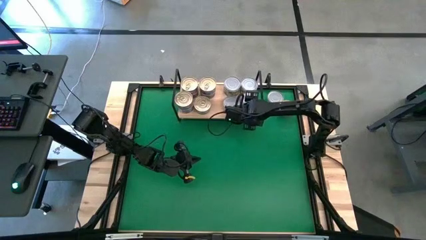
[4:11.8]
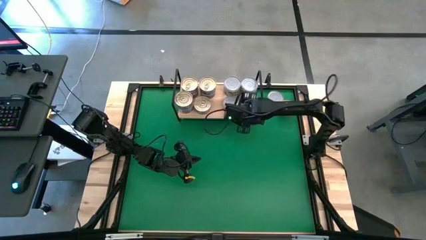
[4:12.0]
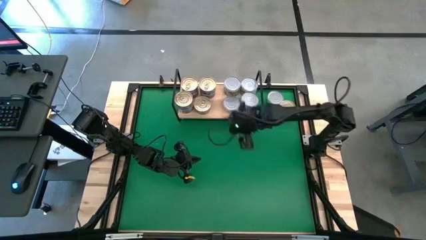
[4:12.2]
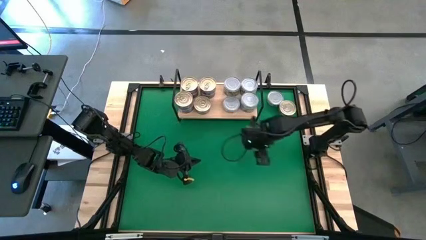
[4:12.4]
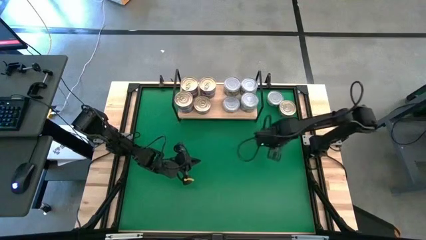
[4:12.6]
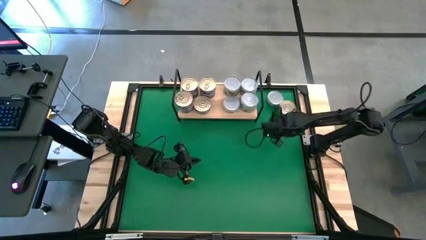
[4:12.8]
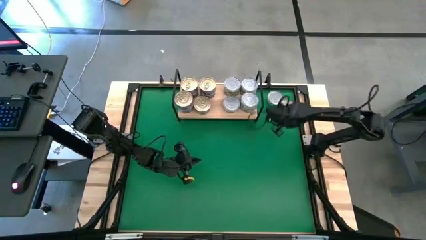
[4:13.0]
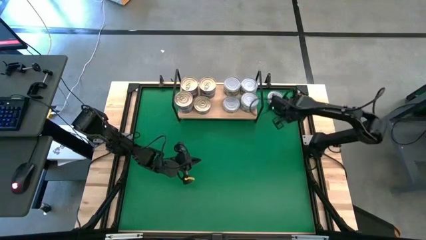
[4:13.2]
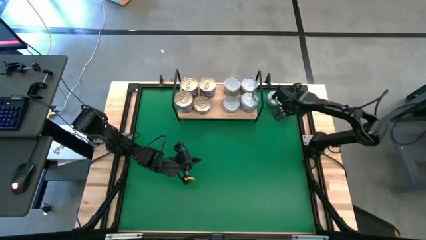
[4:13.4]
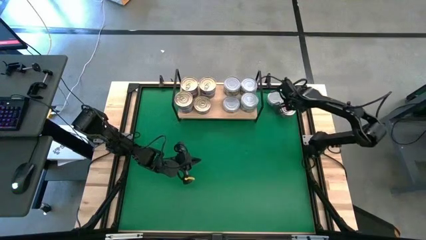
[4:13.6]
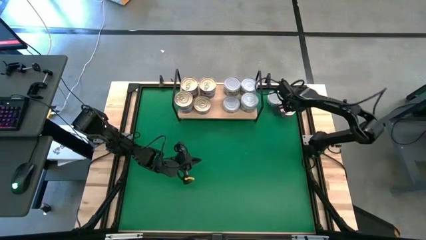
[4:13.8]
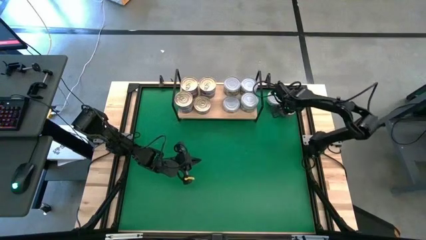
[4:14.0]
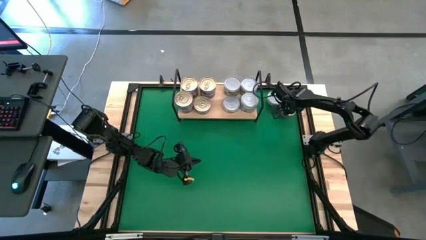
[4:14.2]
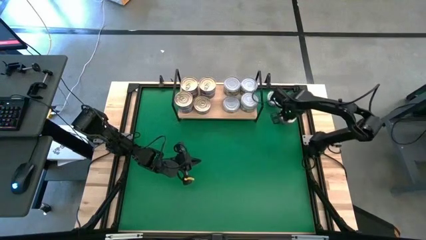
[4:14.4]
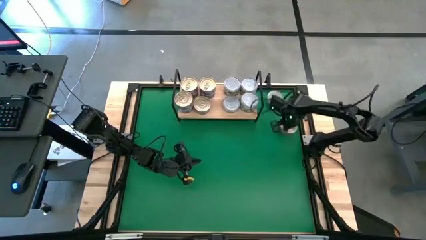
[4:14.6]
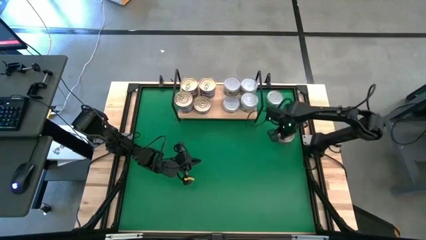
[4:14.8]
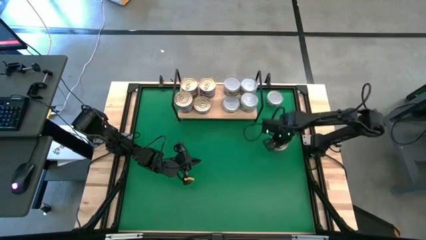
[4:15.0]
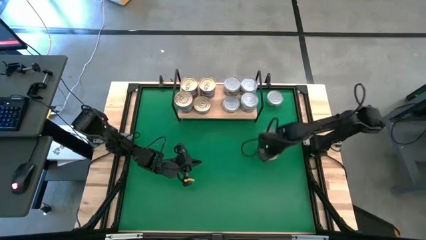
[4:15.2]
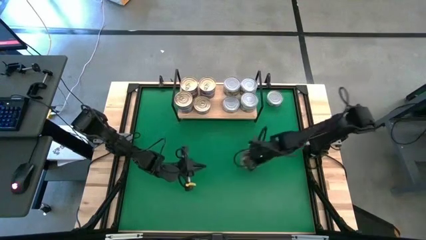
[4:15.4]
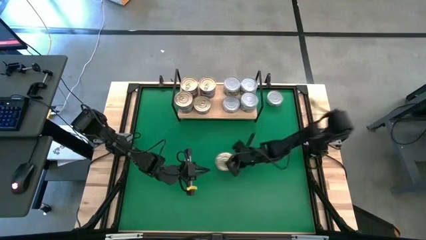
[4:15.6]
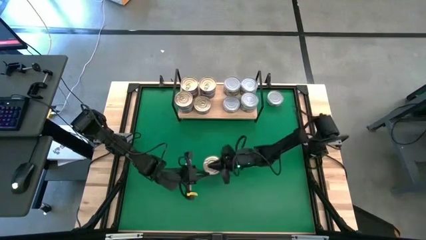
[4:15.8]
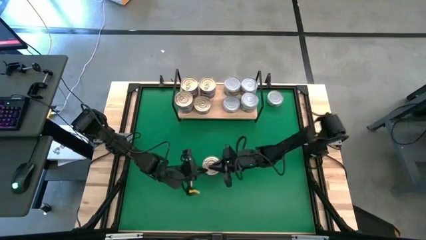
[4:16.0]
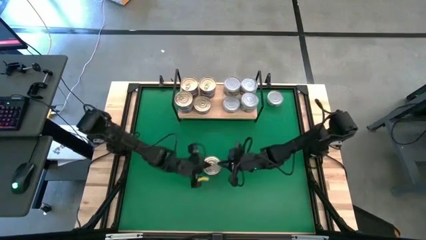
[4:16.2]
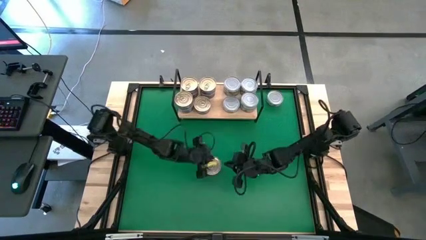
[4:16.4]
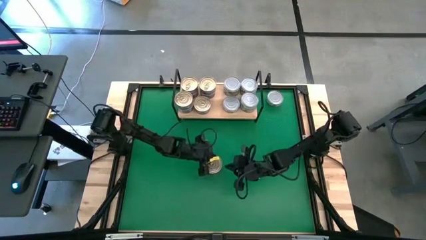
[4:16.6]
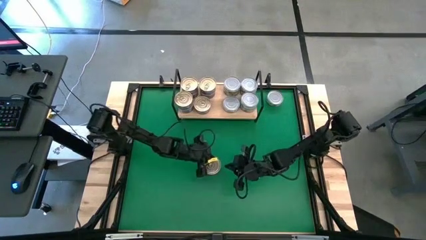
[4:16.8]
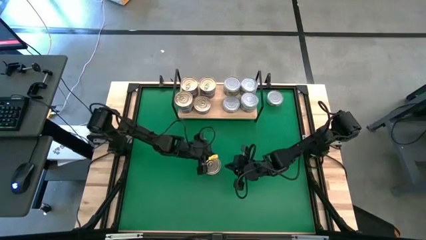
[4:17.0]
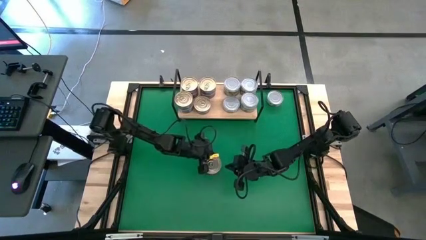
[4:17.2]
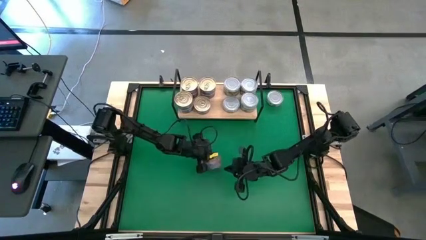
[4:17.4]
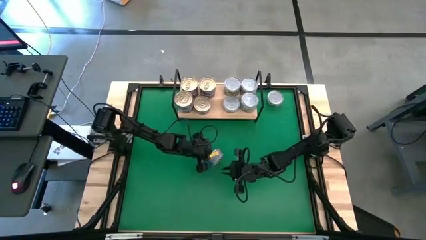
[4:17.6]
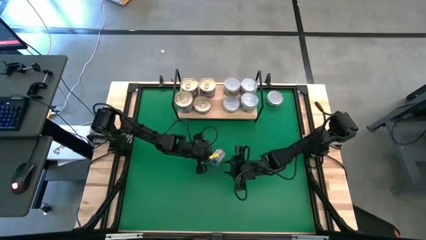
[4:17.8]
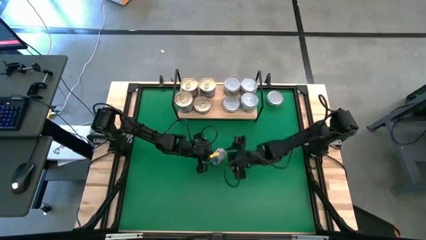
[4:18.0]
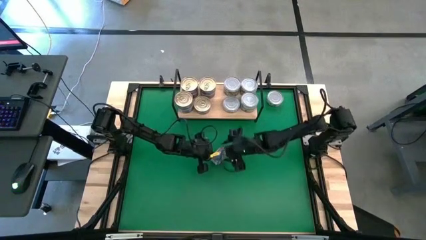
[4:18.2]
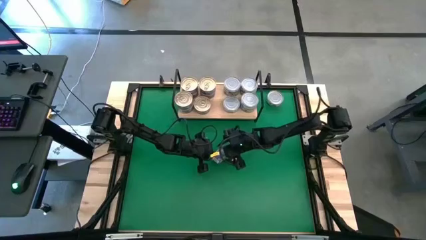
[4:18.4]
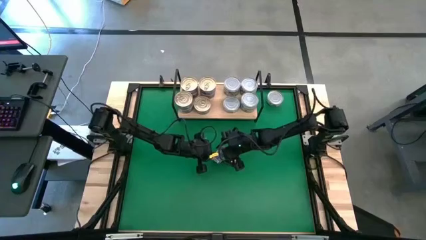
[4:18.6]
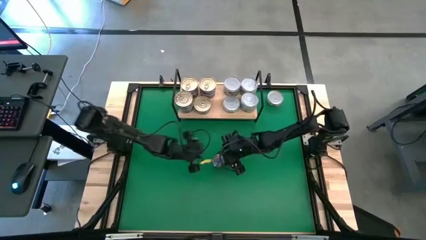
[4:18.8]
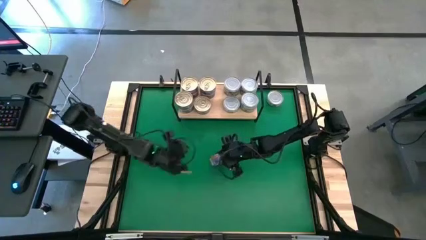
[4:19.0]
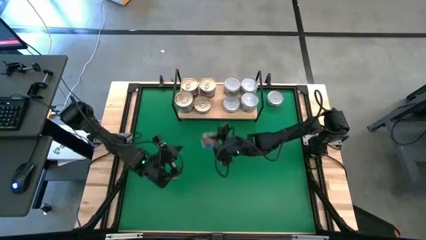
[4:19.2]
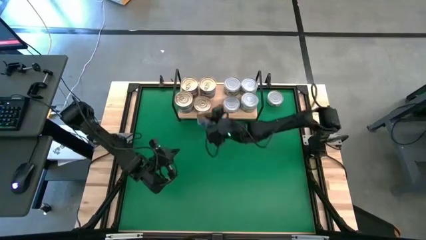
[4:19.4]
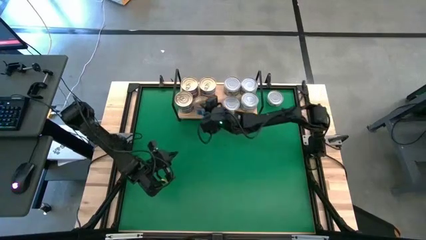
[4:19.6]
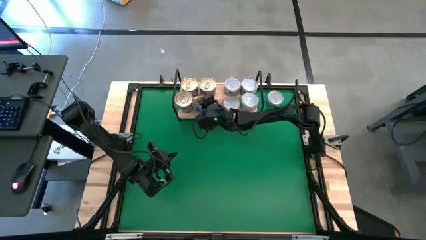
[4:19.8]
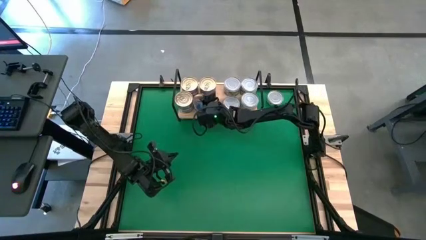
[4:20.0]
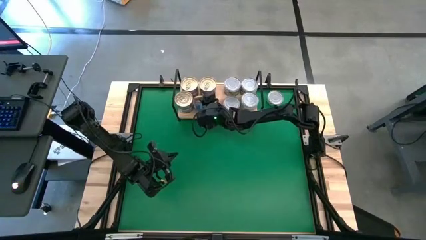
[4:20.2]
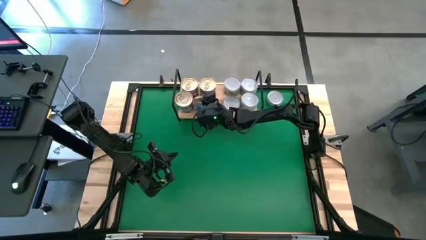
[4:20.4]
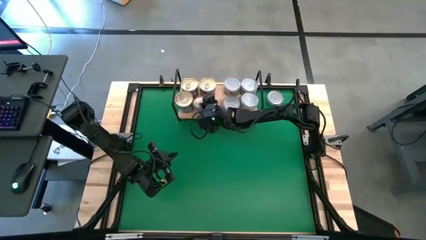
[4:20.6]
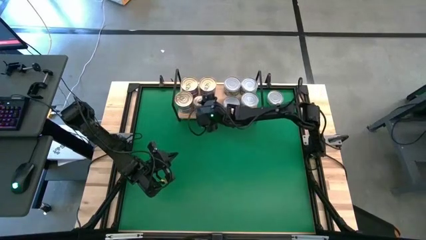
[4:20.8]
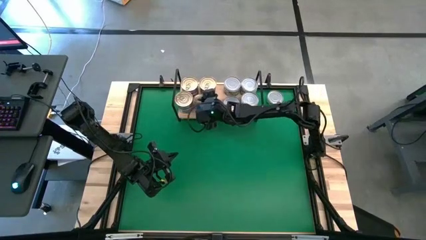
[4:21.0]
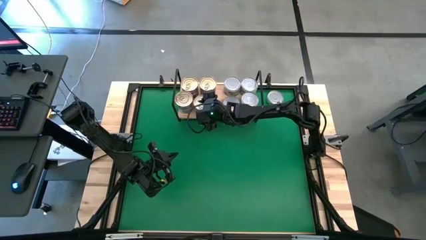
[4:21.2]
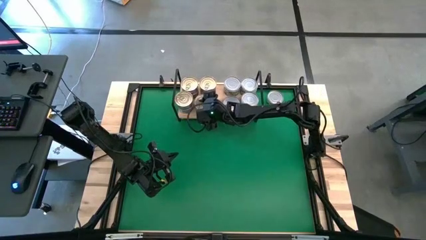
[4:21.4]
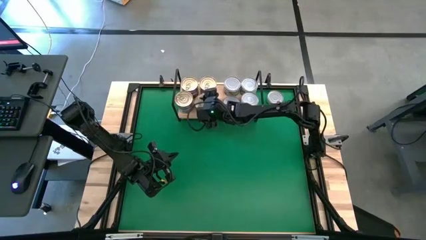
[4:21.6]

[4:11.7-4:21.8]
Task: Stack canned seafood by type on shelf
Stack the blue pink tuna can on top of the other blue pink tuna can on the shelf

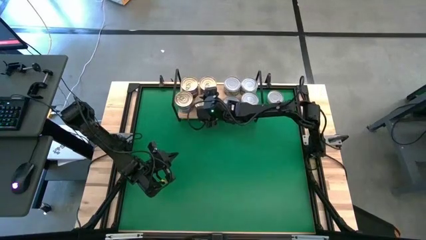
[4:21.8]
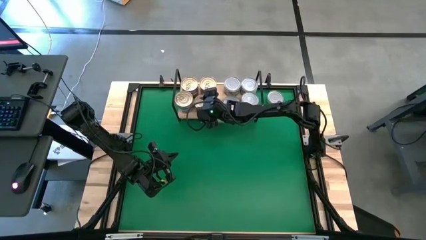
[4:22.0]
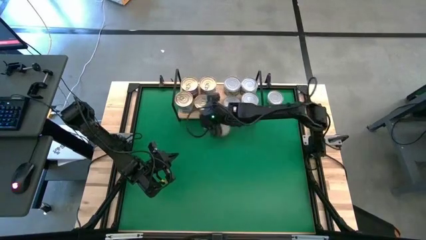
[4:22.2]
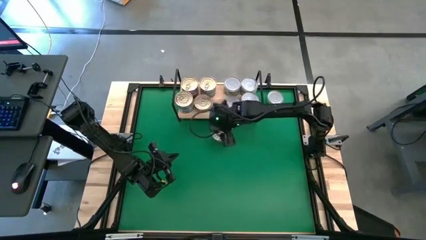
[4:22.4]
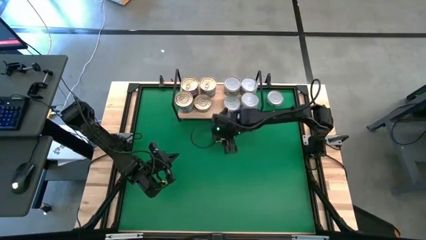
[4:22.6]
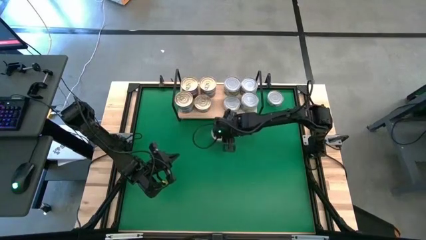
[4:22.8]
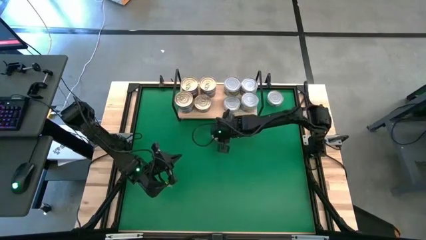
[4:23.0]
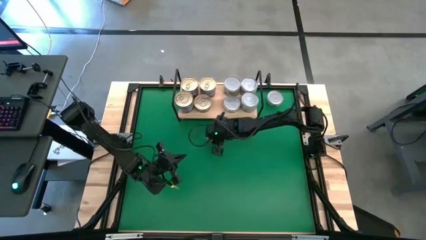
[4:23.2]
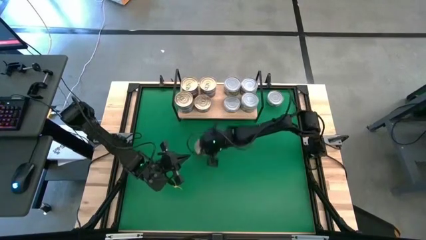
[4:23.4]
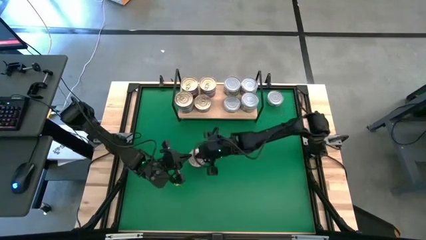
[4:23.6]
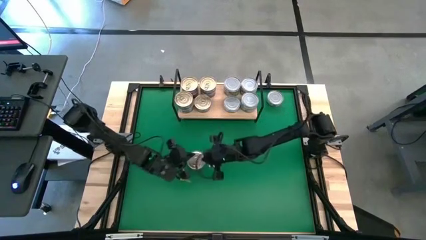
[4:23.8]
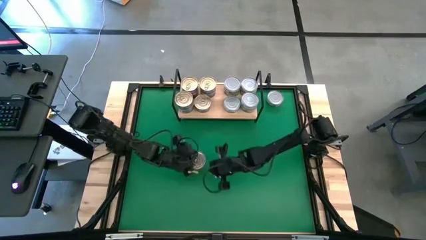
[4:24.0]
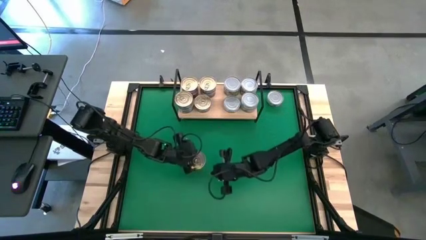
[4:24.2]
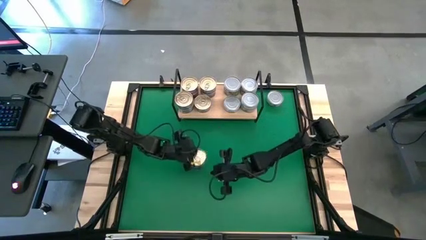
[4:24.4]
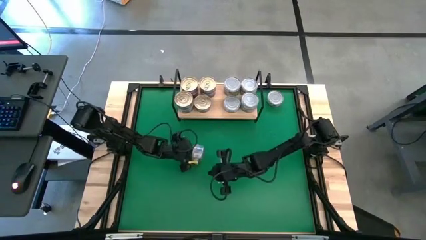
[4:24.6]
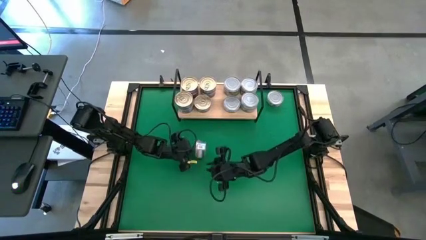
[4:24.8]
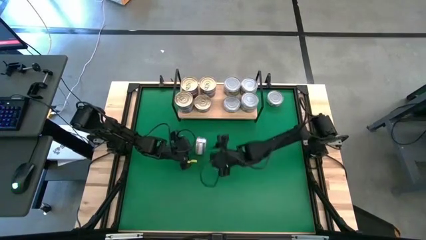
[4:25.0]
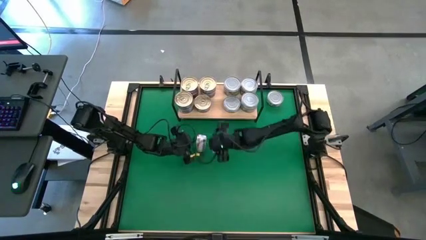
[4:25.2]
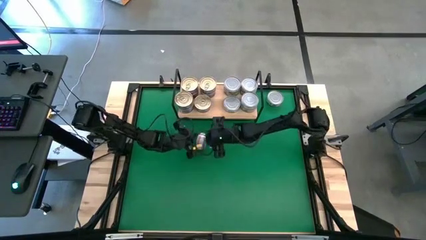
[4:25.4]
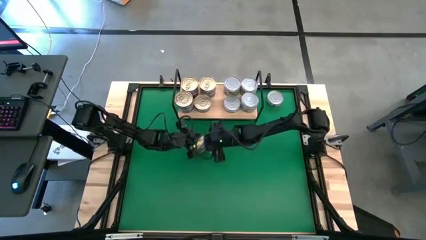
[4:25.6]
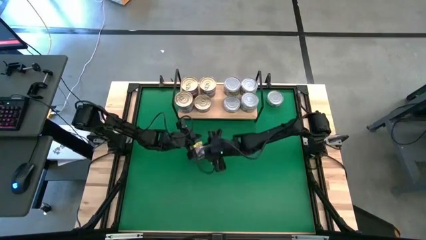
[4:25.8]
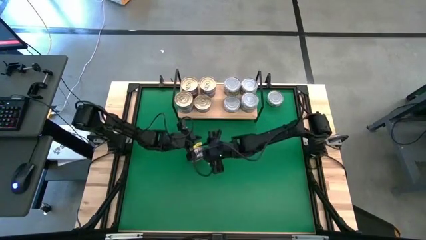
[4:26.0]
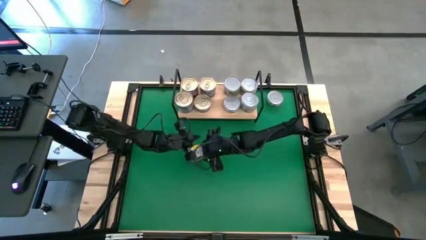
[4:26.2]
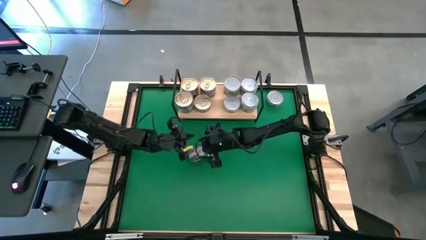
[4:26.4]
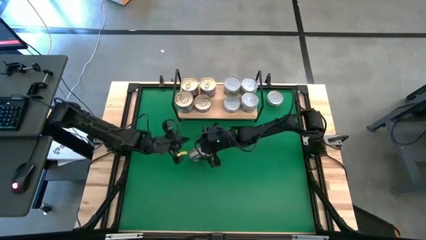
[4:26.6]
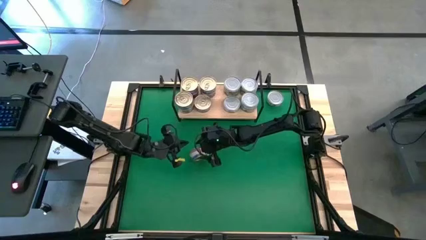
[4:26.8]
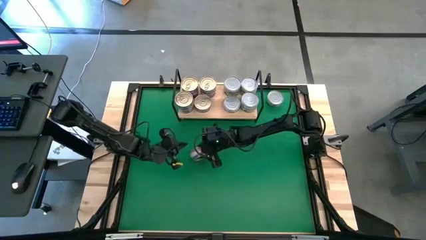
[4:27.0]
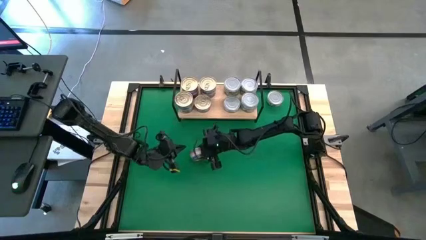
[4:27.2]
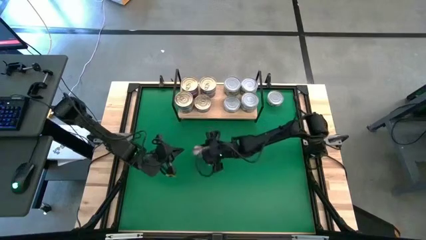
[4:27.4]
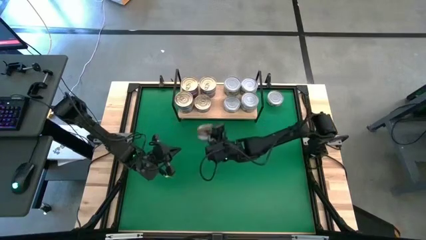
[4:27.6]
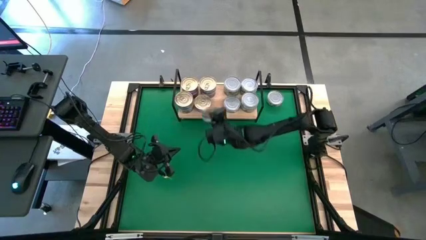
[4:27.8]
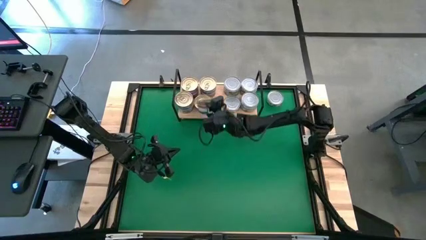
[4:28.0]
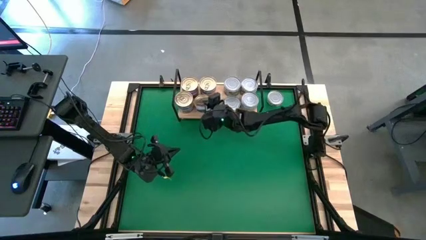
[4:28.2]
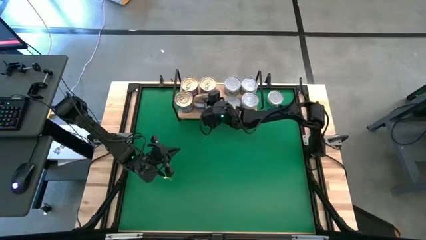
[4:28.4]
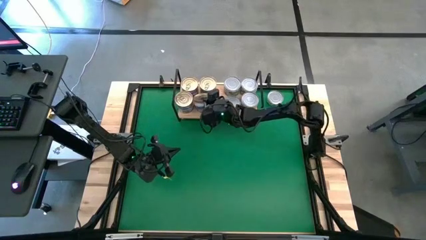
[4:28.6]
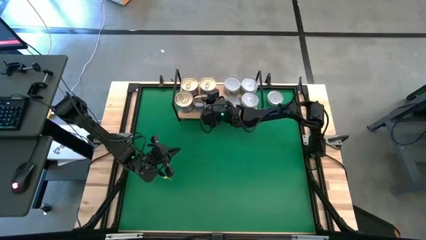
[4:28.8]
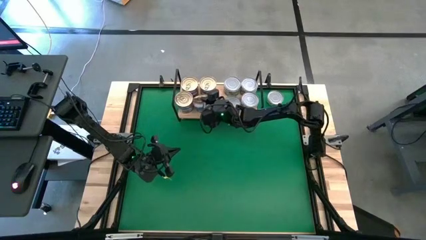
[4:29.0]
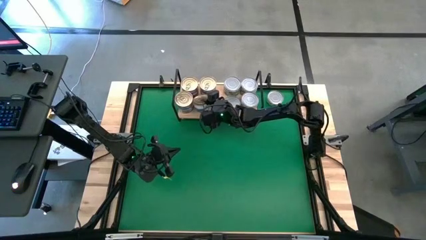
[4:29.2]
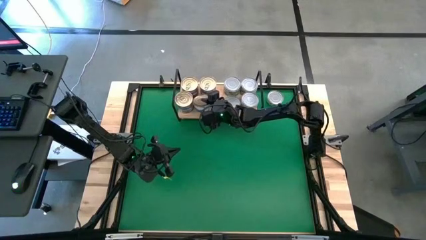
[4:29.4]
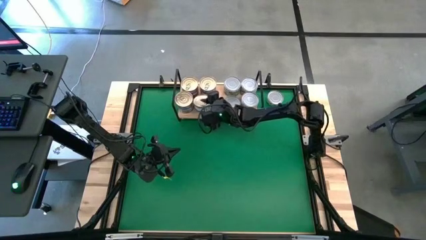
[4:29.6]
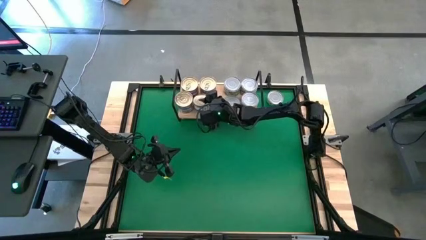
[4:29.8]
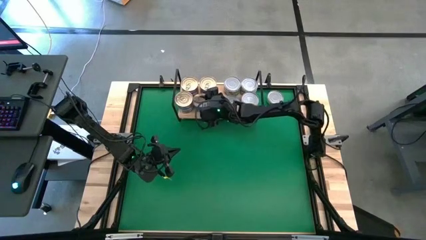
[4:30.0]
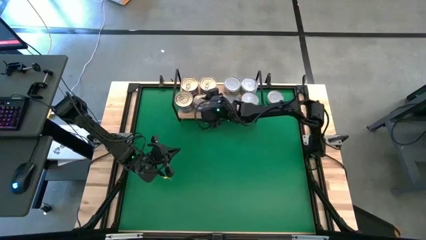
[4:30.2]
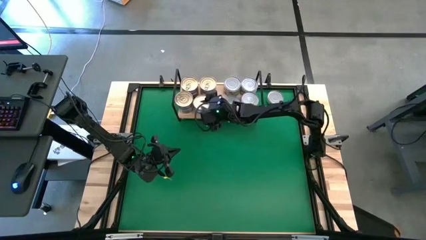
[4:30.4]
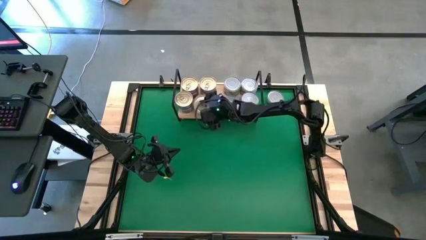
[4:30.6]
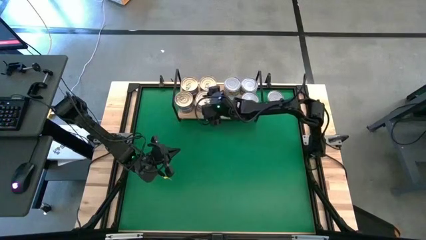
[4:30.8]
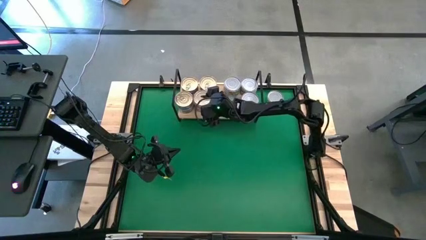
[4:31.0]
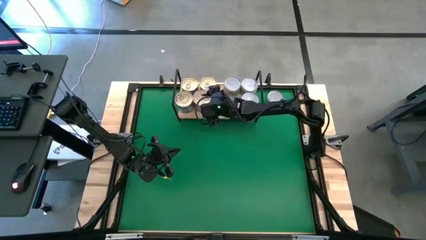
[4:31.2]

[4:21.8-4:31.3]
Stack the blue pink tuna can on top of the other blue pink tuna can on the shelf
